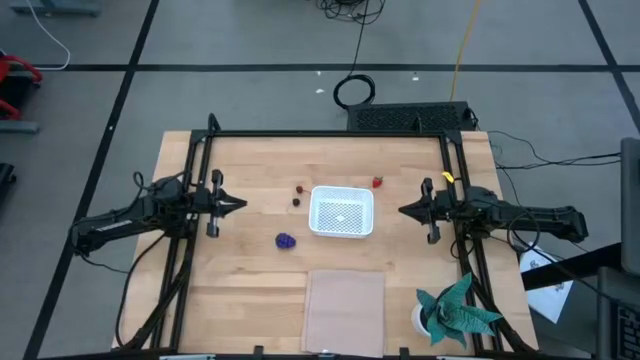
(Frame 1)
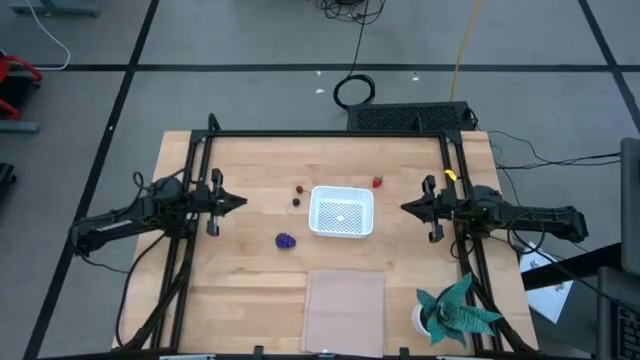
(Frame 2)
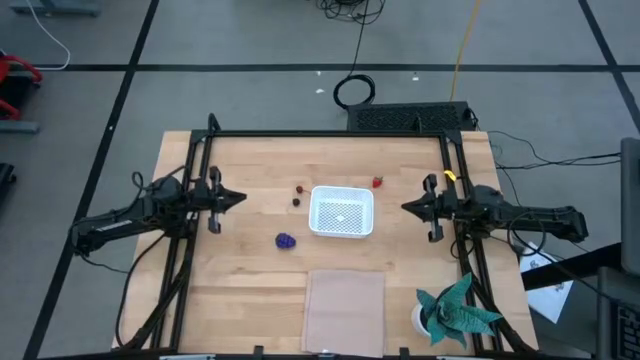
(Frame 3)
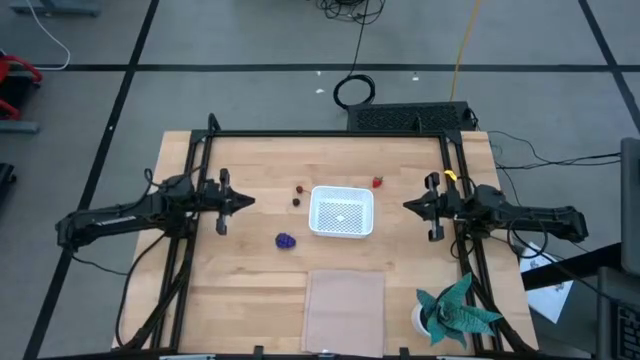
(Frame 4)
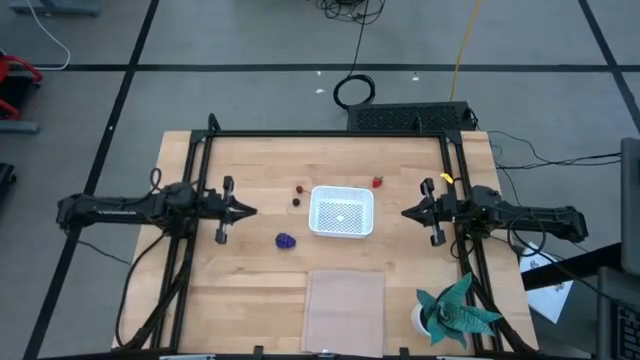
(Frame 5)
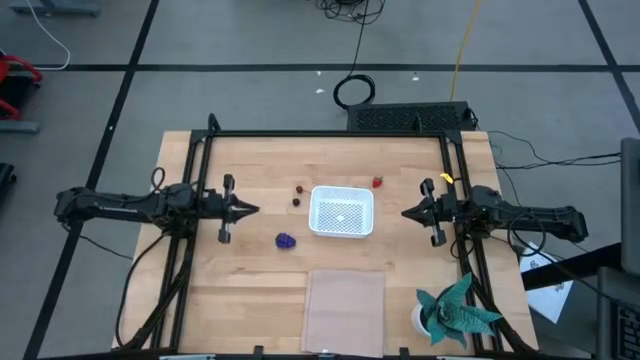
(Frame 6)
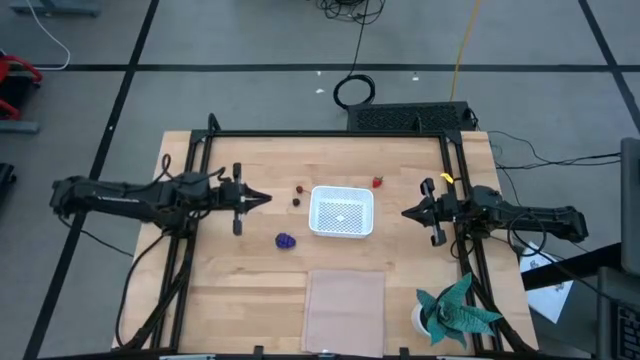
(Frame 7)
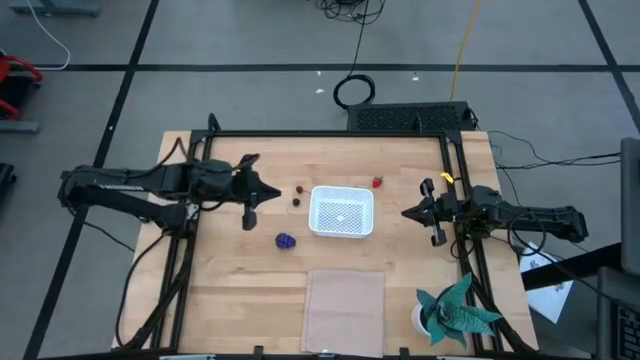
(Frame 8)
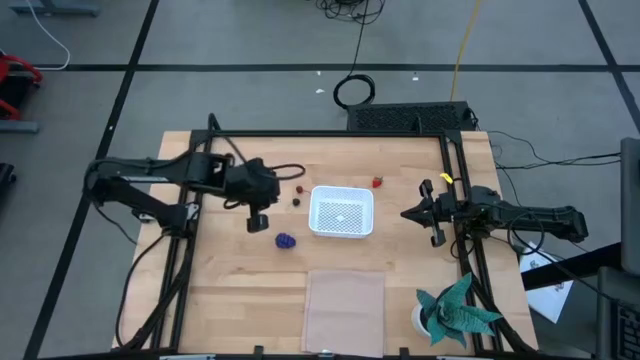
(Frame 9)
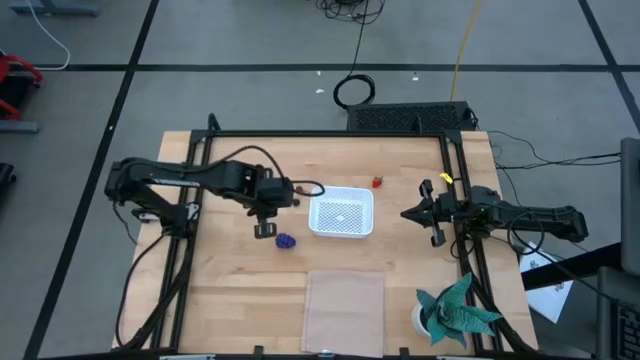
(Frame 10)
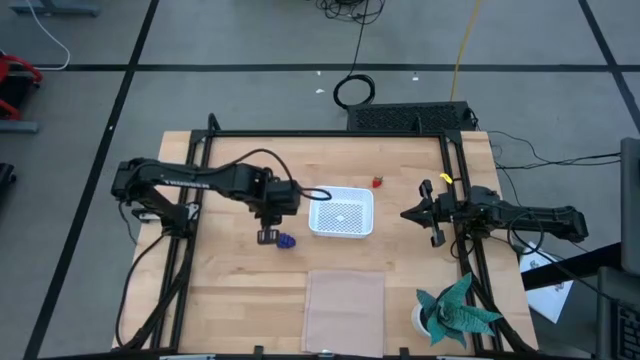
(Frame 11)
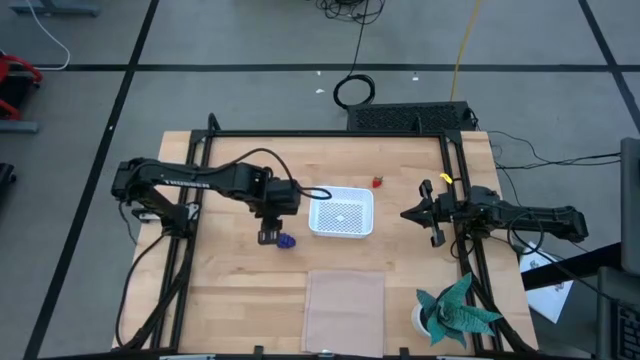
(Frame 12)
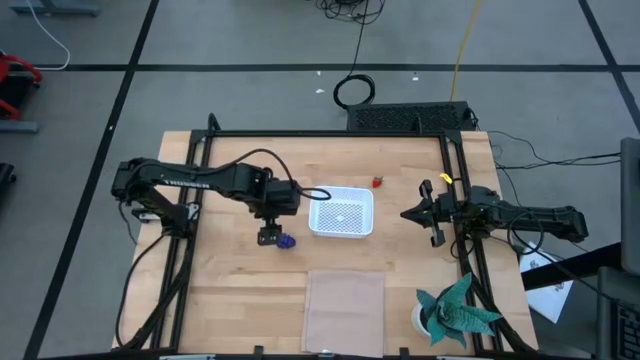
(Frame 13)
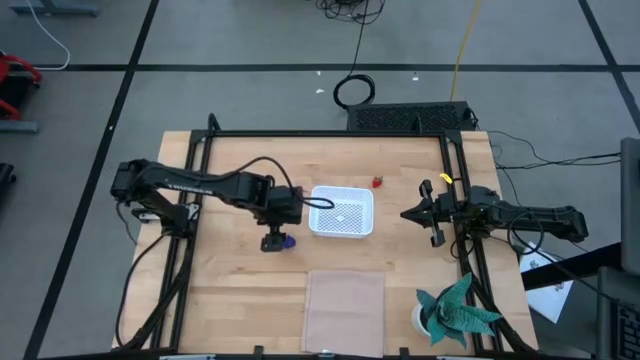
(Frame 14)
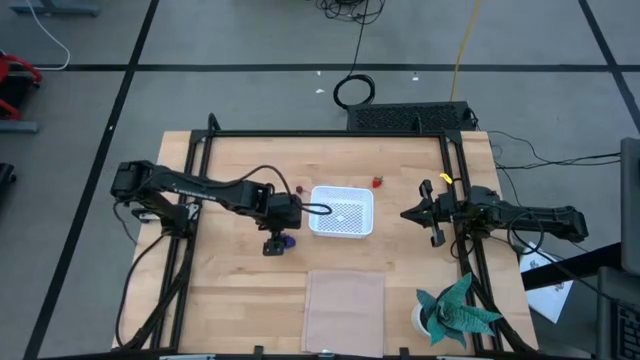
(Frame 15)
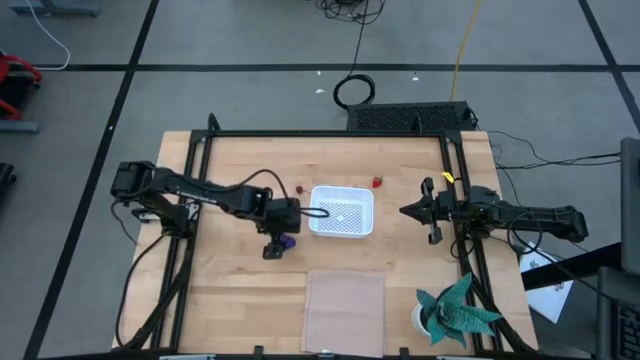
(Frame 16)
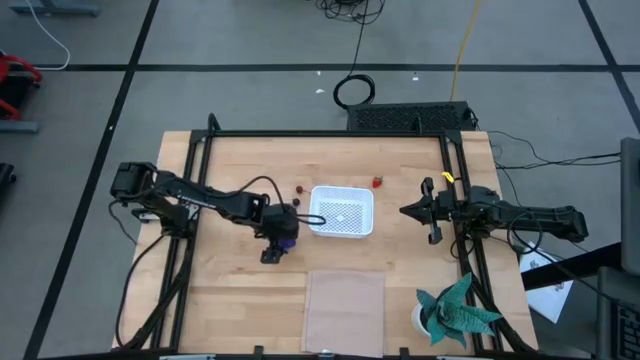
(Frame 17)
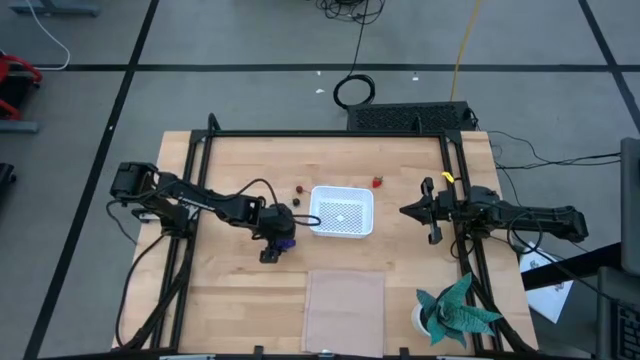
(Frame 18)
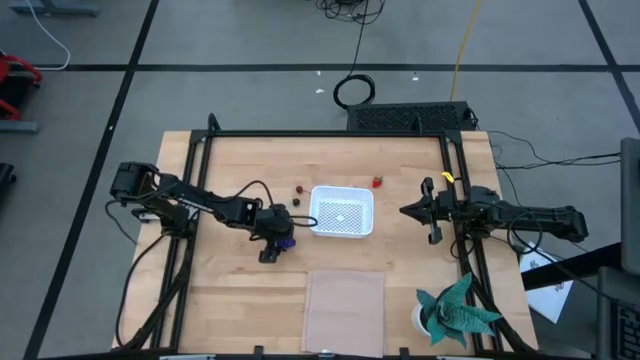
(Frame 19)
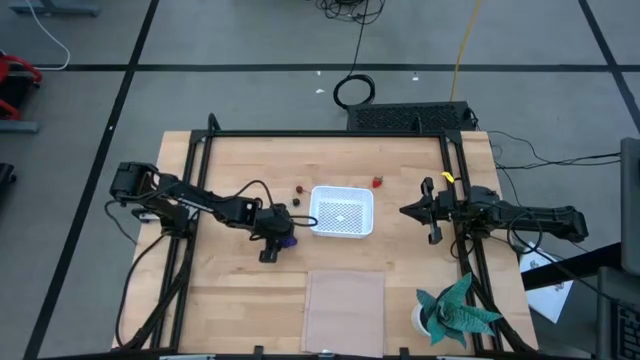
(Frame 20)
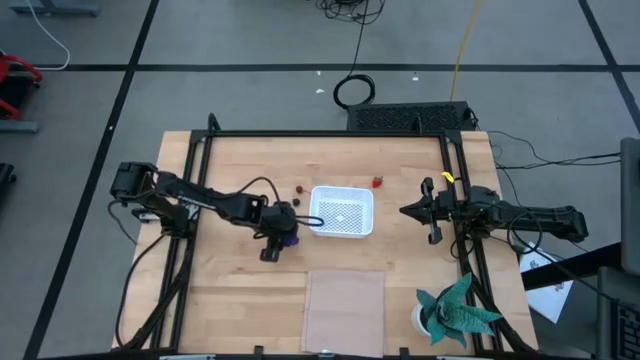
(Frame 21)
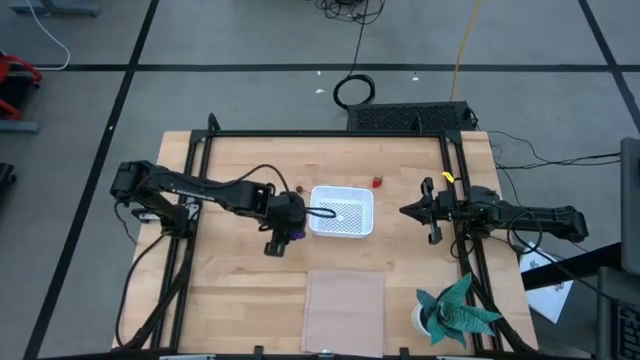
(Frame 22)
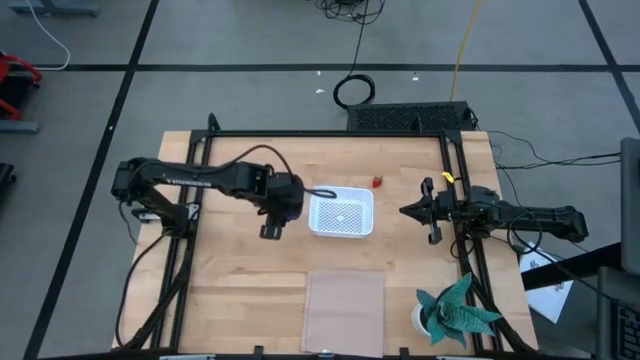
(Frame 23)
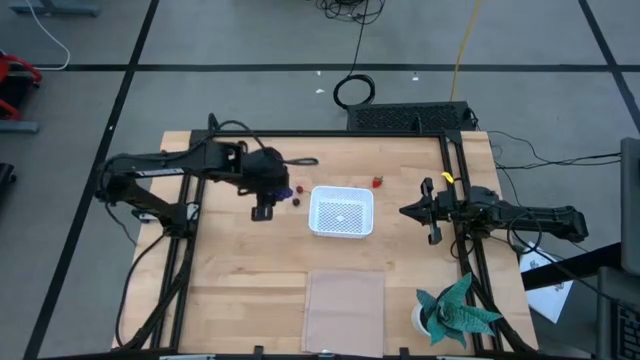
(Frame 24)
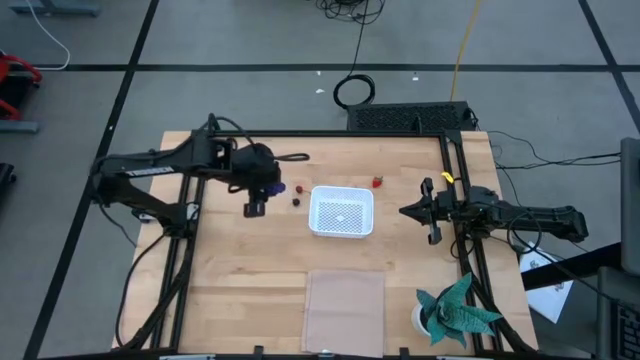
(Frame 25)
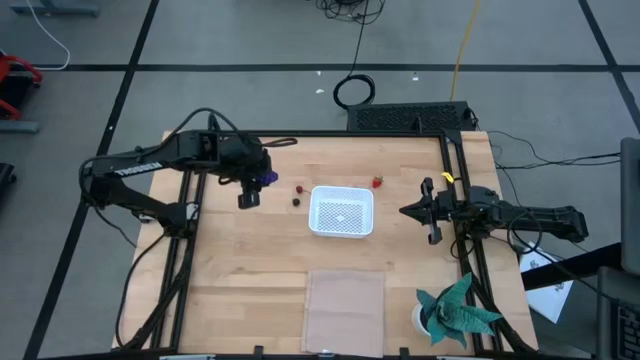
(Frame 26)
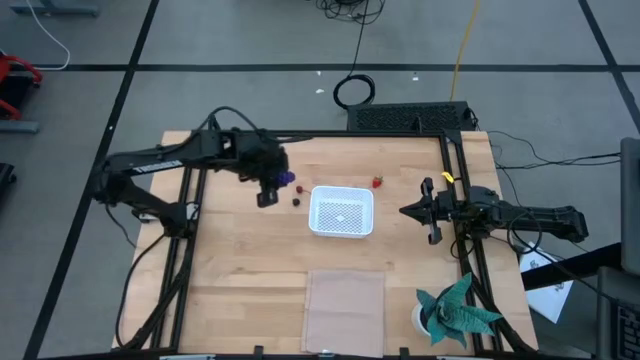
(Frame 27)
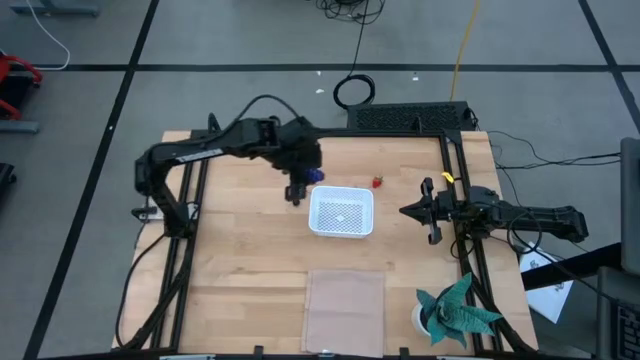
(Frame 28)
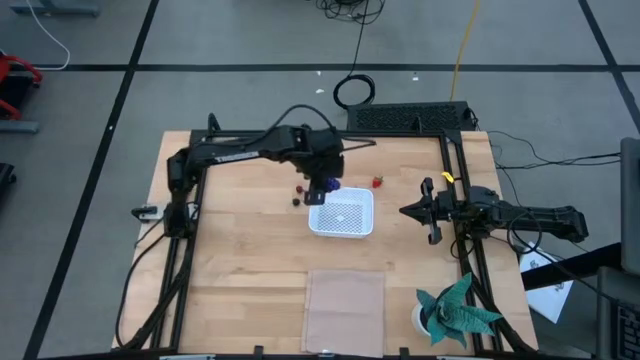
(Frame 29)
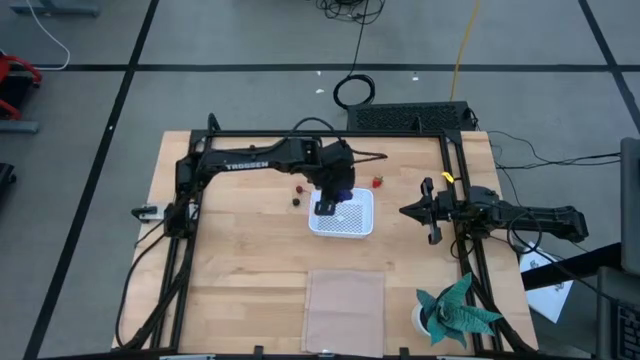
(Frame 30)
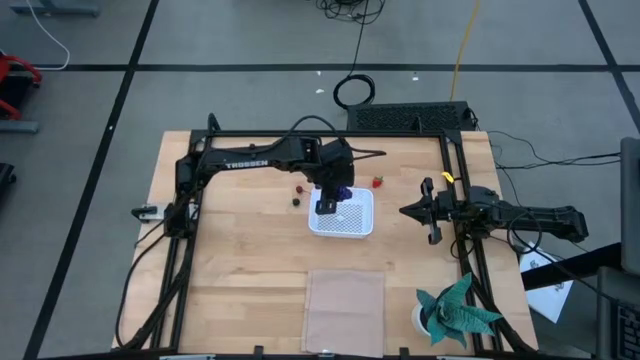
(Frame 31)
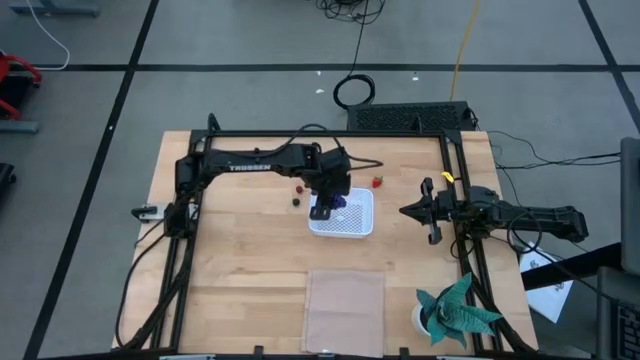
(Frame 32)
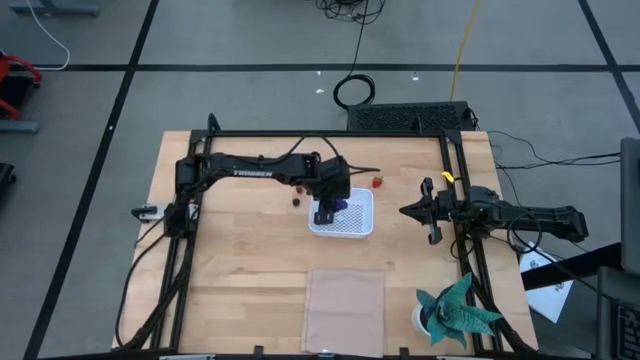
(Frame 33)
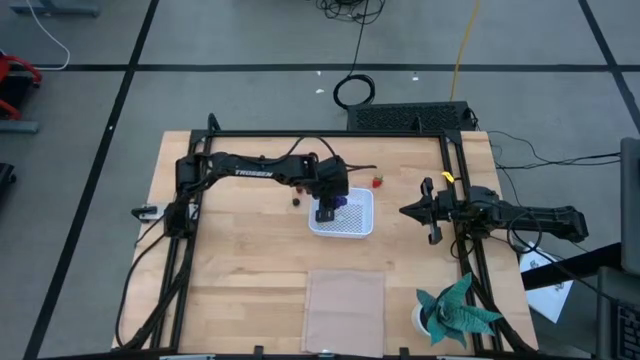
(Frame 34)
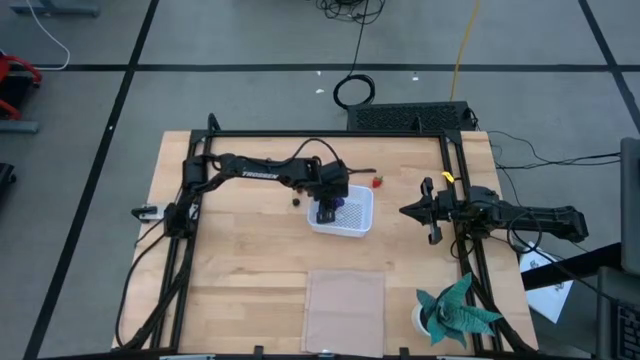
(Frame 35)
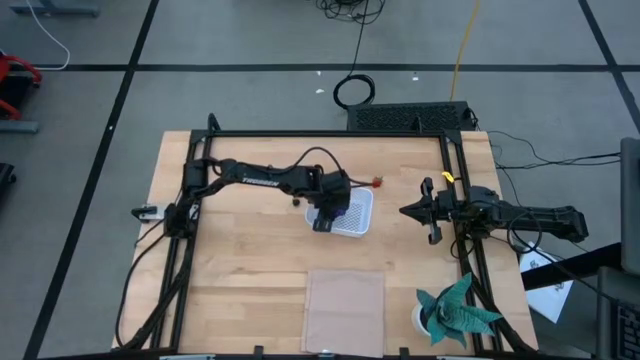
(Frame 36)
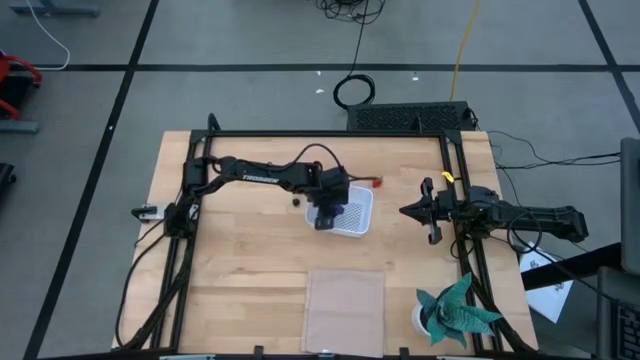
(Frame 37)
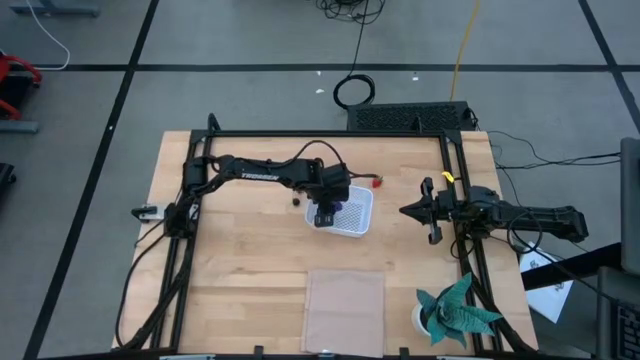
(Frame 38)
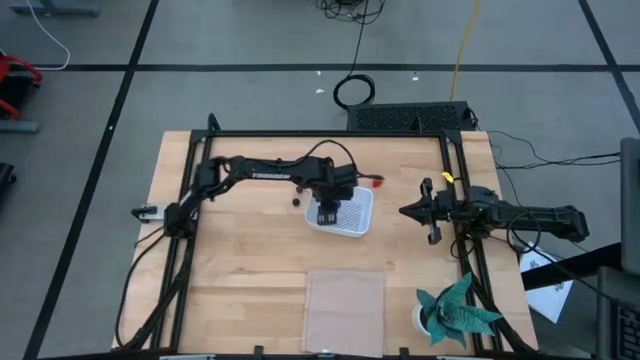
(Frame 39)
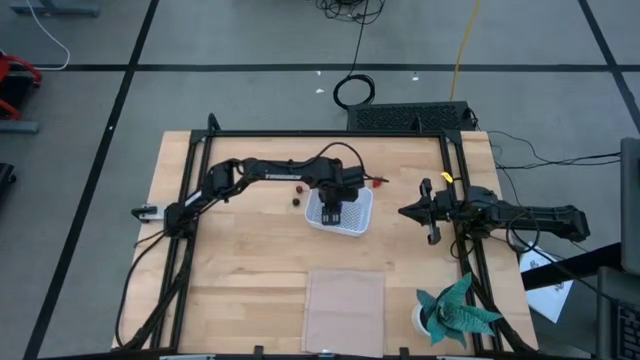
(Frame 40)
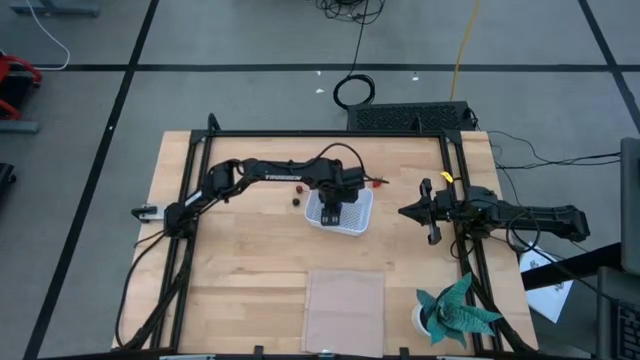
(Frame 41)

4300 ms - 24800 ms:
Task: Pick and placing Produce into tupperware
Put the purple grape into the white basket

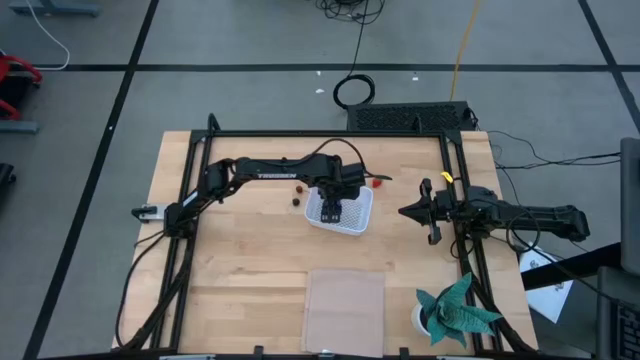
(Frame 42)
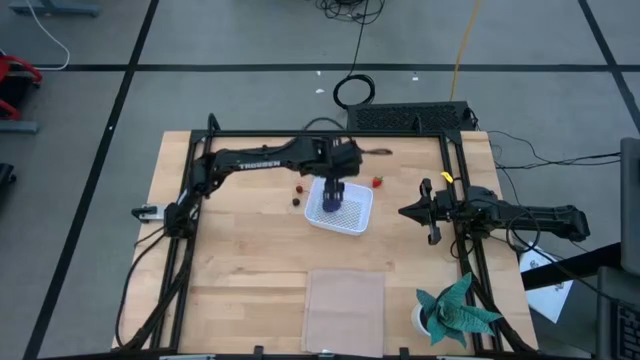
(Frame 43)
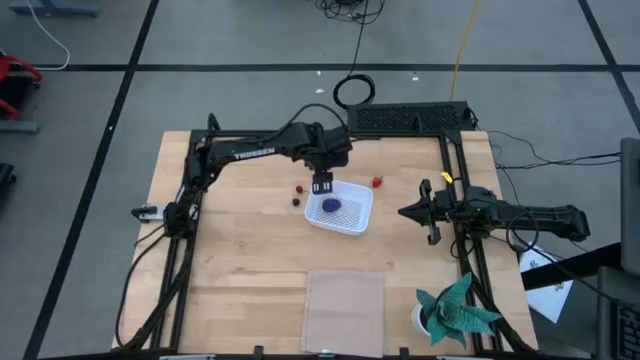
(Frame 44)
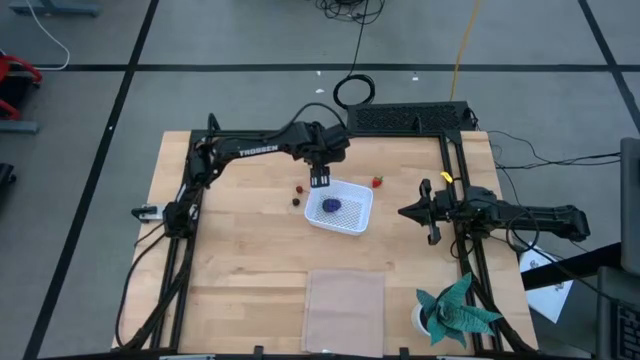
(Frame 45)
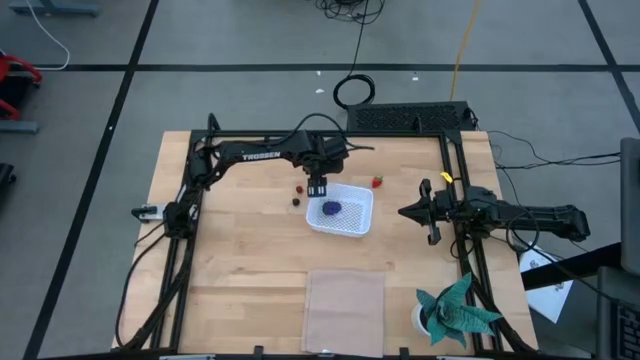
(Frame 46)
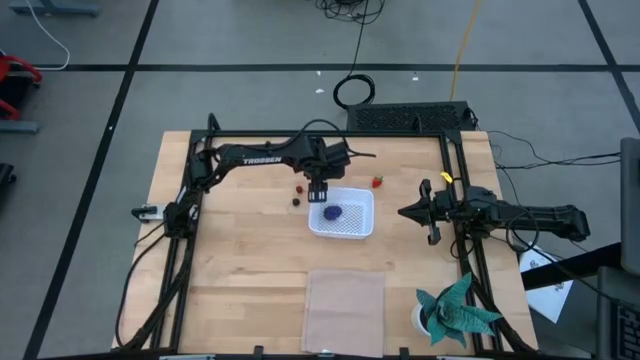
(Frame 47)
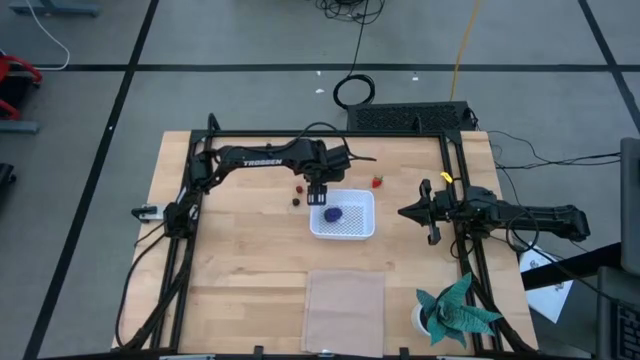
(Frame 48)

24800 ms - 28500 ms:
Adjust the white basket
